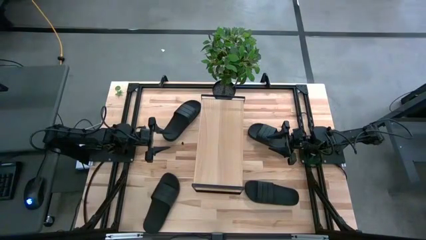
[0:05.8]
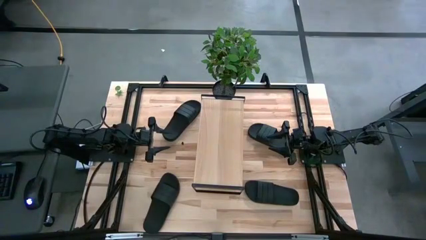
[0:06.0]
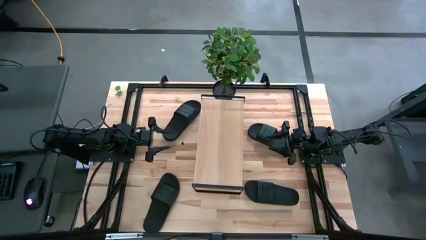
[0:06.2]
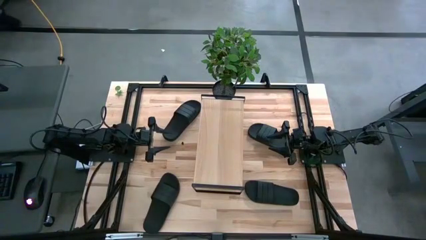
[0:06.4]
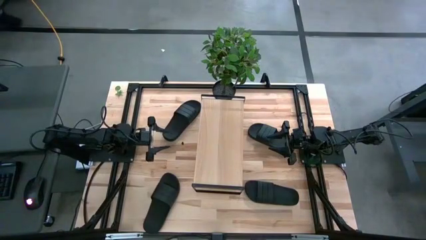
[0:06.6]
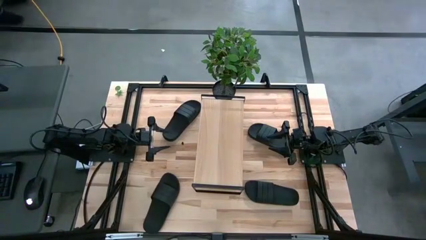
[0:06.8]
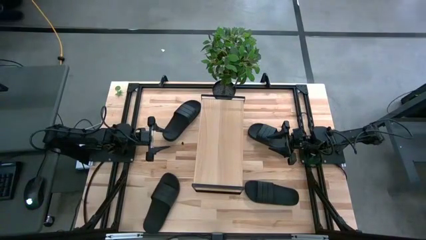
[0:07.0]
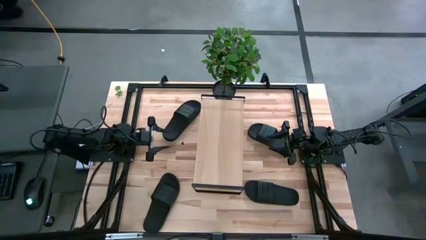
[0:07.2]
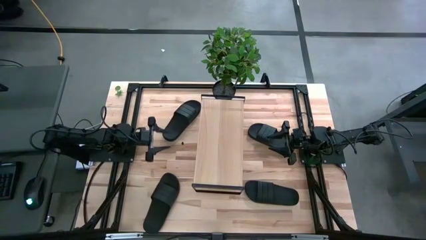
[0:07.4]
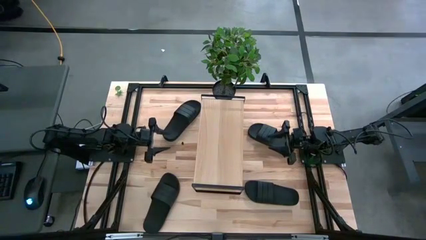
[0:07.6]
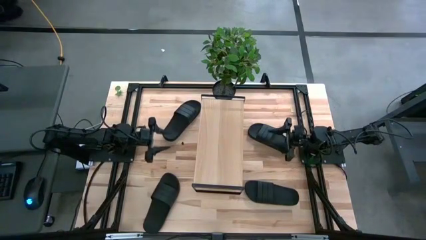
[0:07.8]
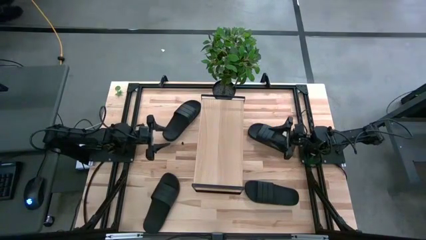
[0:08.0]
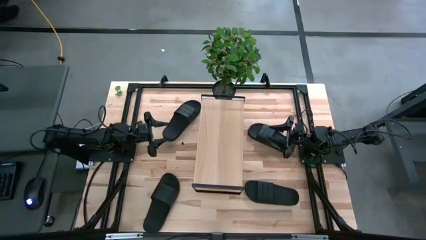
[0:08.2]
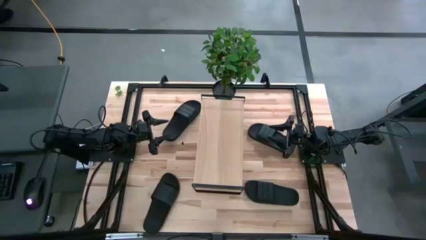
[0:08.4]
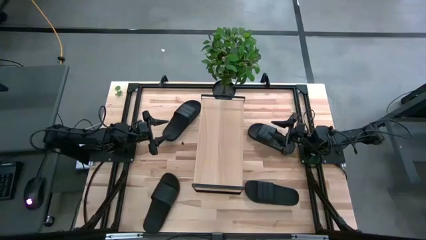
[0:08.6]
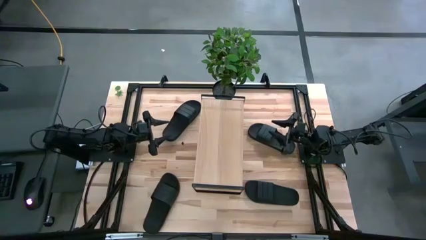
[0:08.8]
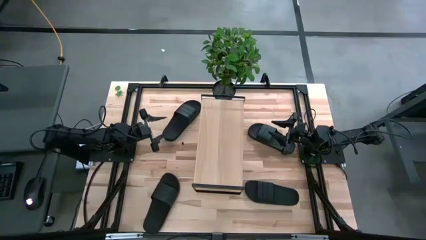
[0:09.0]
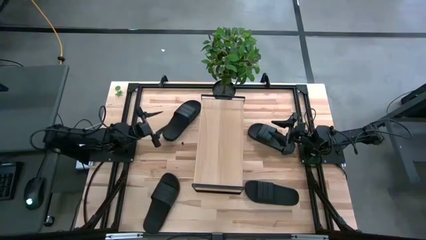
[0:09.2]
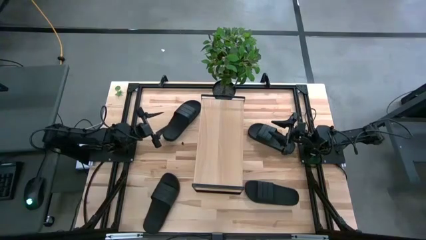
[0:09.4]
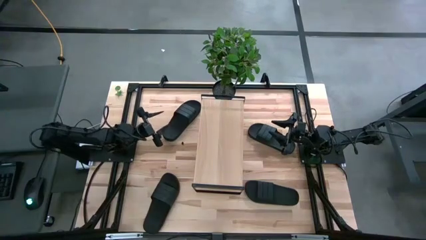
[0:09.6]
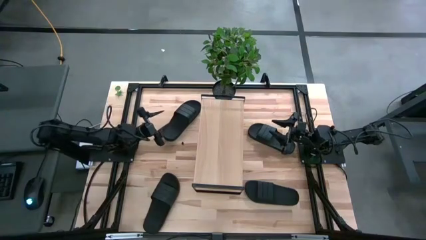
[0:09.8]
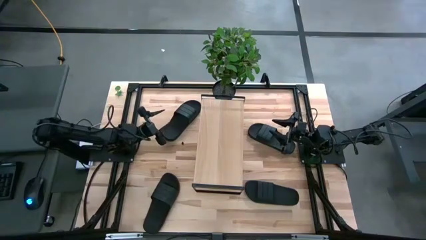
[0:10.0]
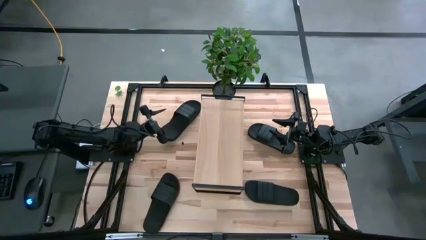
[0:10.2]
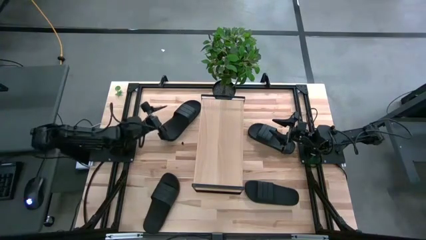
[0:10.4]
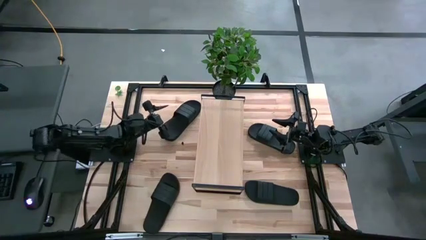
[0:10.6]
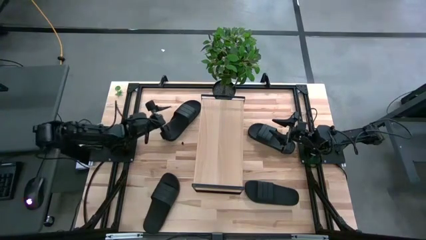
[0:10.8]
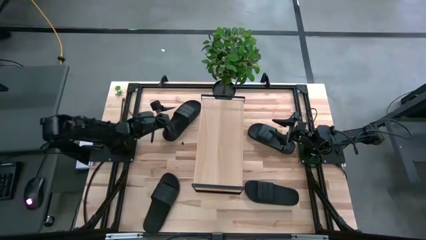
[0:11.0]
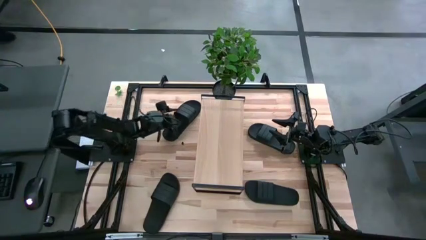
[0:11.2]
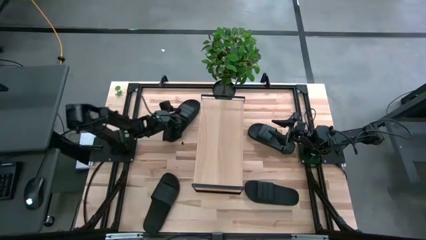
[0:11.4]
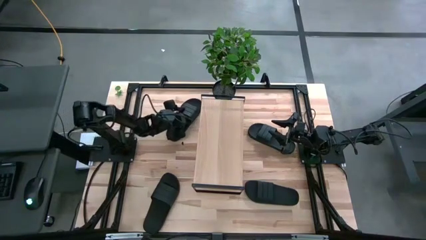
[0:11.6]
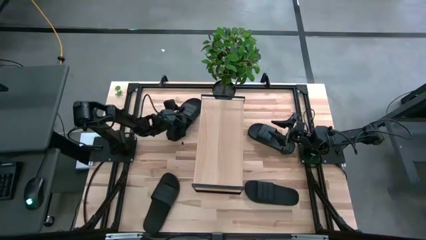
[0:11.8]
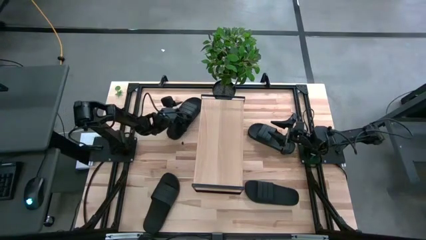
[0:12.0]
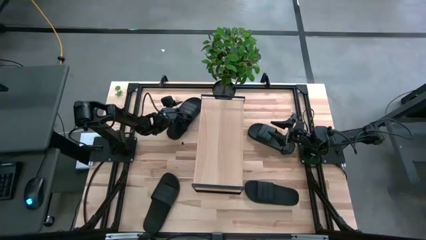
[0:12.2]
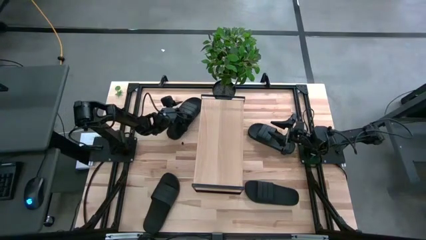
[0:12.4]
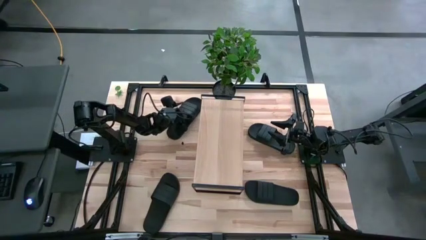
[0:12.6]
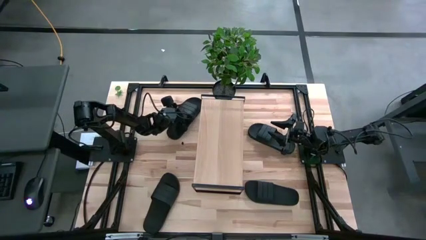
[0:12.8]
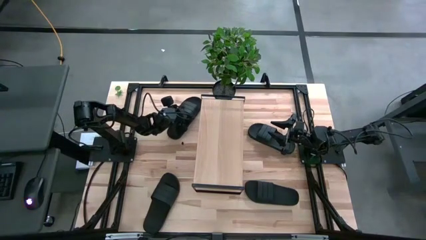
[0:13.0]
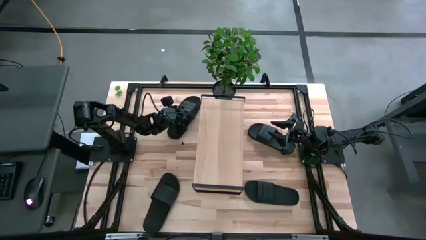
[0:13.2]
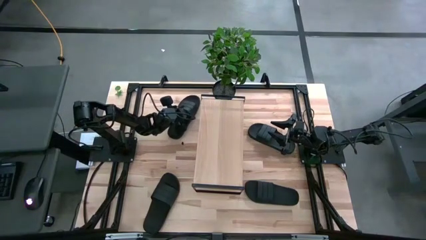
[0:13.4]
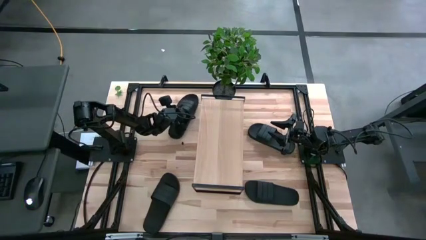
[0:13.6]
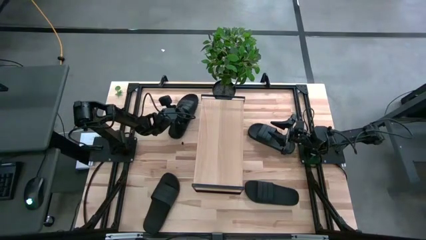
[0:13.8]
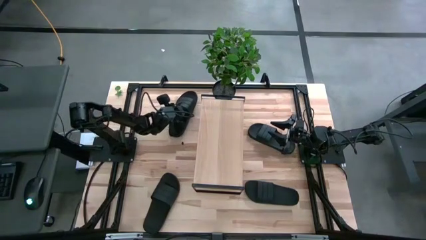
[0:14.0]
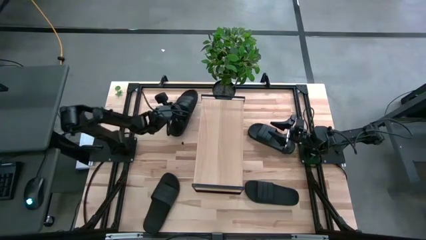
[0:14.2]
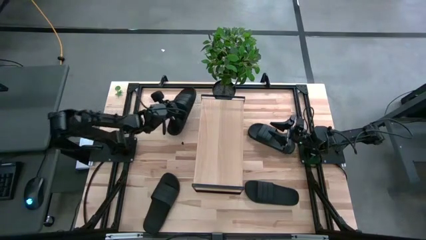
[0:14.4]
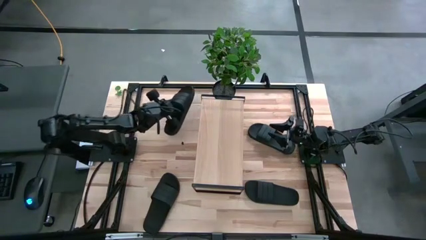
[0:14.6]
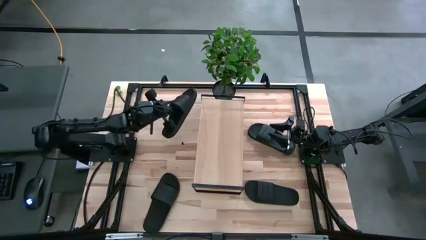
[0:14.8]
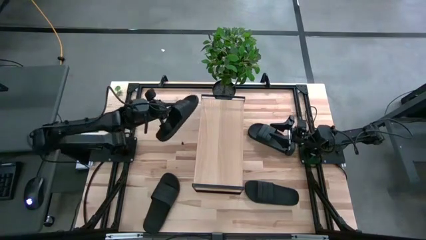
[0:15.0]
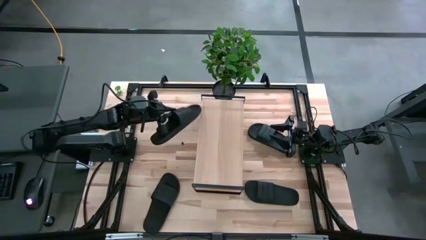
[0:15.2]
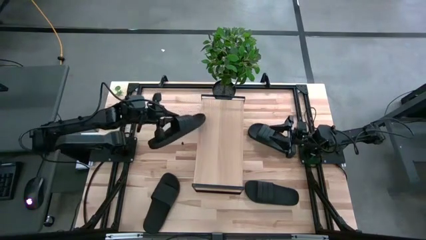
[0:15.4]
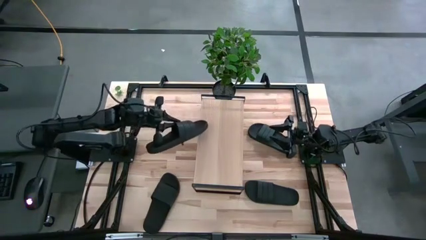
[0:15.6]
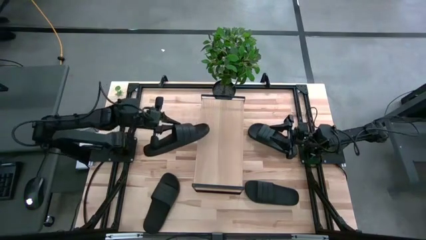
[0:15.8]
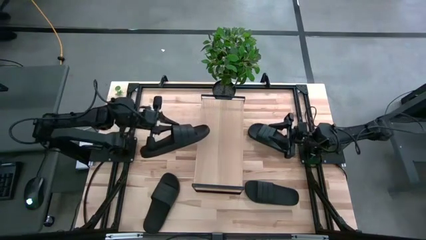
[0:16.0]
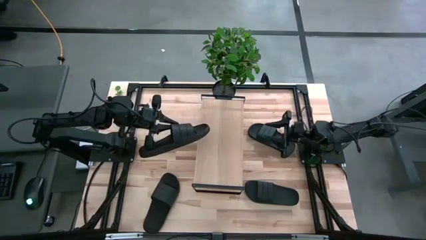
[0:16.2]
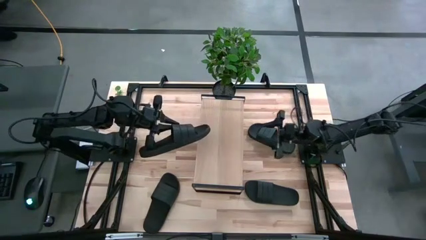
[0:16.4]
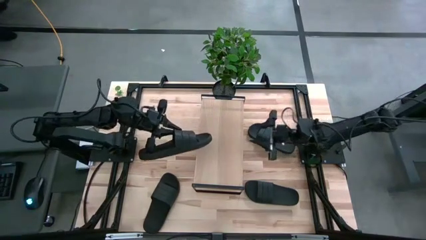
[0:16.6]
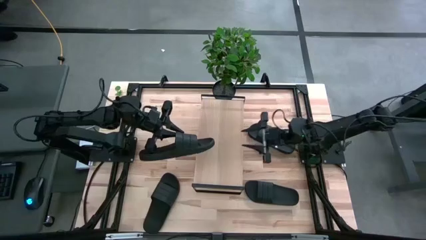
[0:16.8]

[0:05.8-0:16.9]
Task: Pick and place slides into the shelf
Put the slide on the shelf
